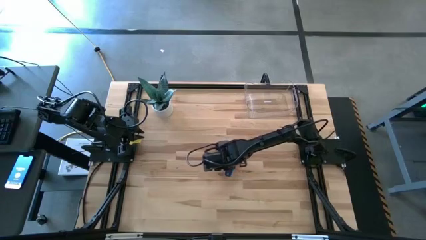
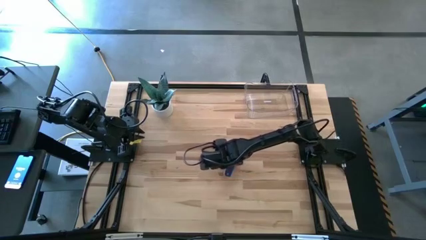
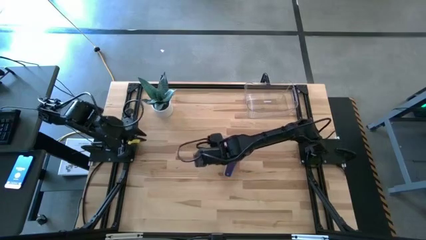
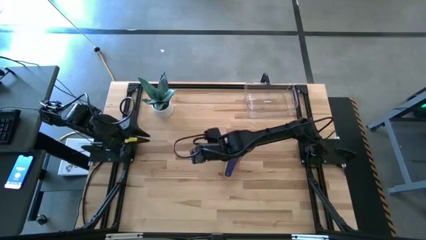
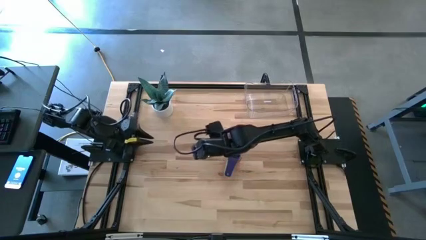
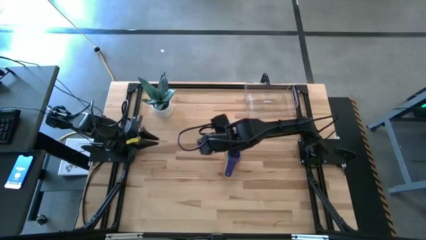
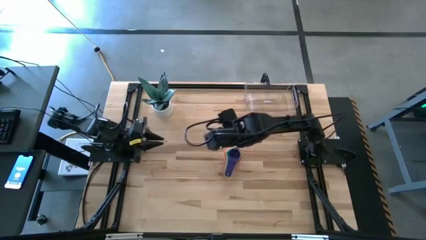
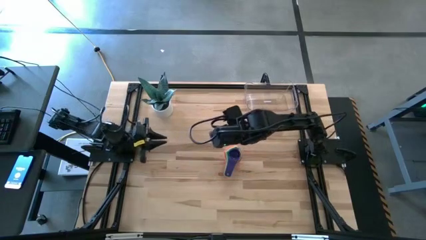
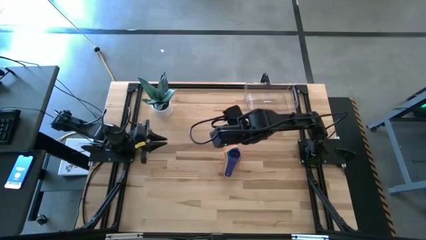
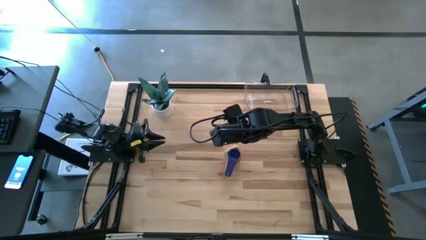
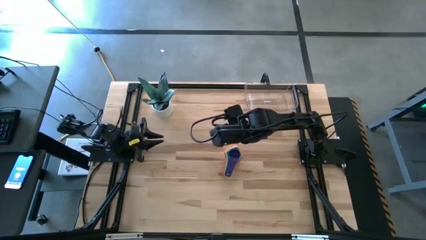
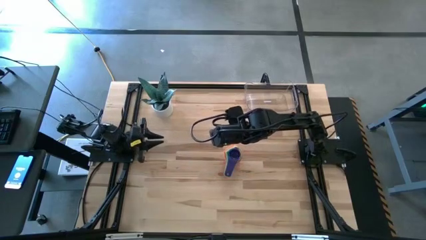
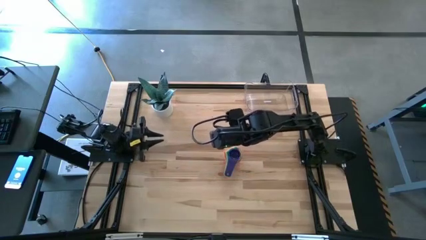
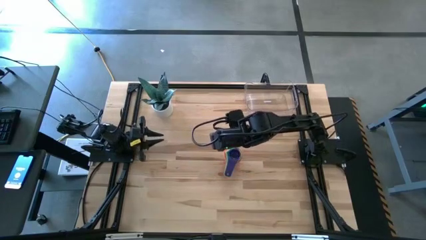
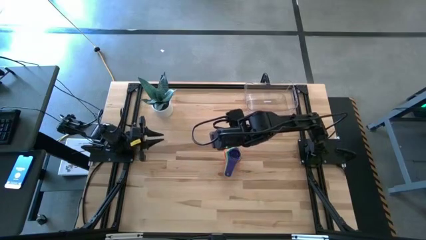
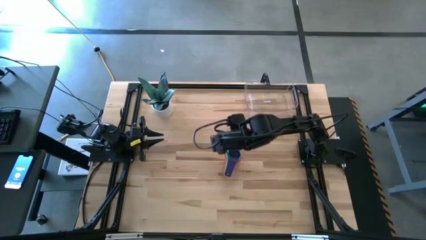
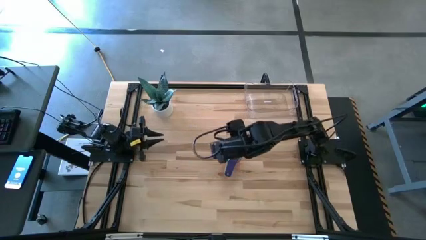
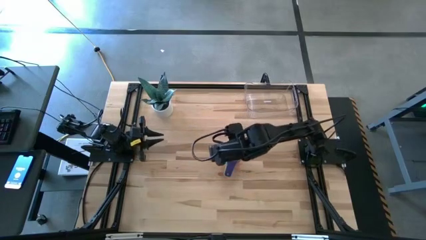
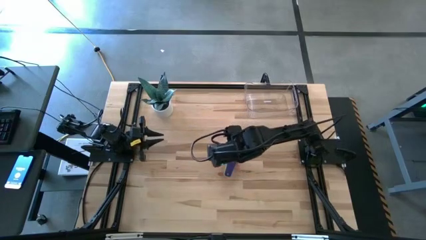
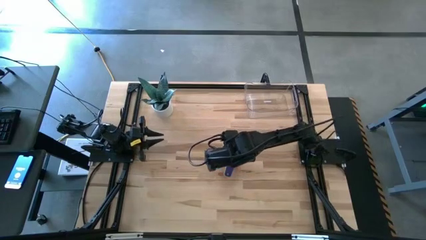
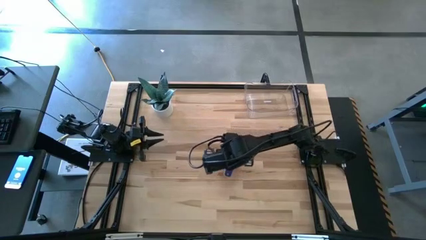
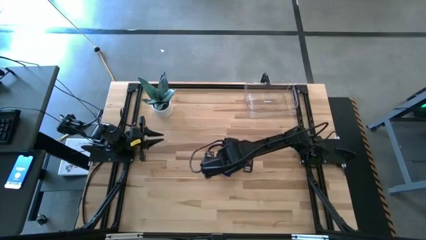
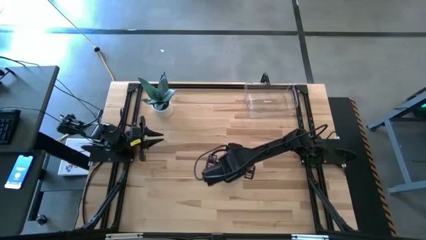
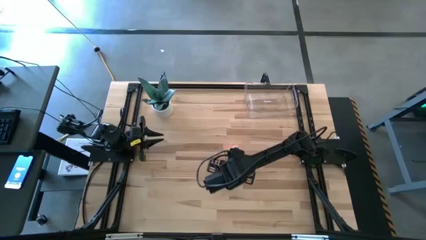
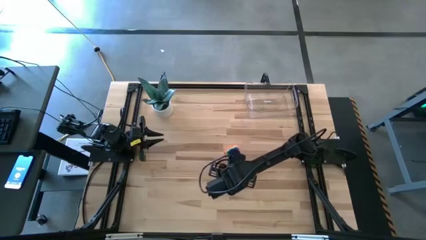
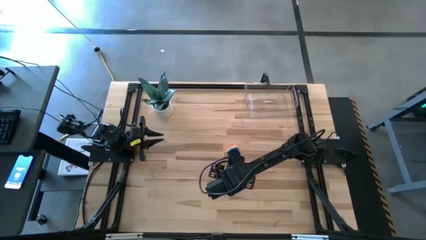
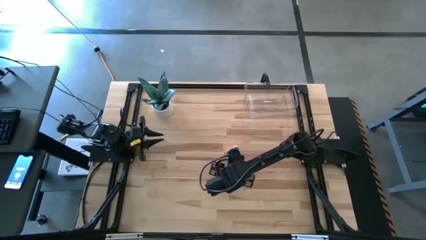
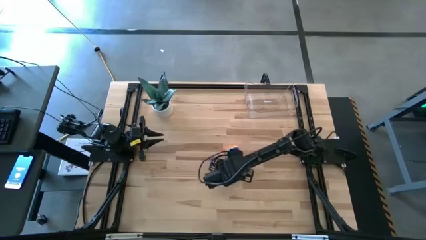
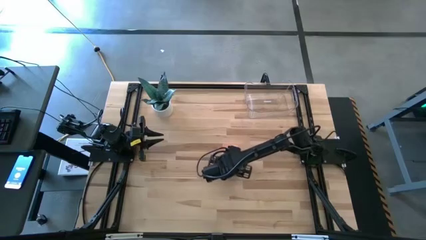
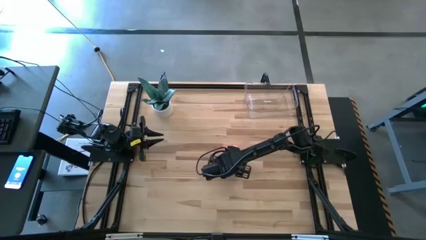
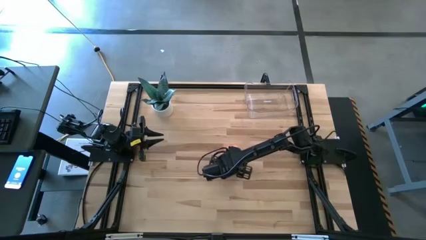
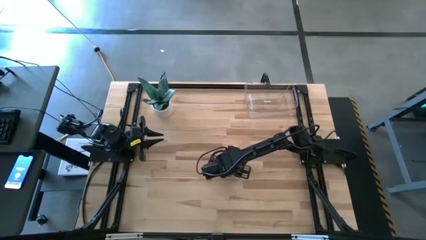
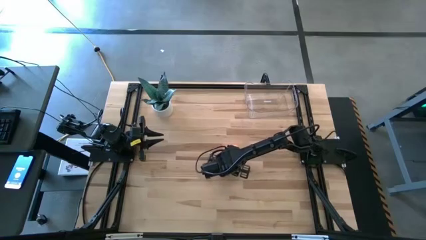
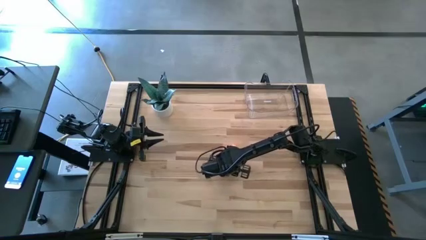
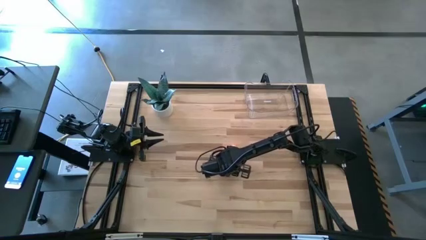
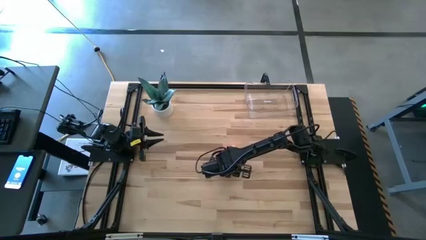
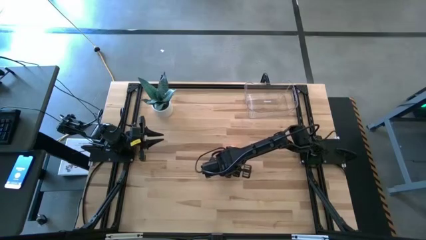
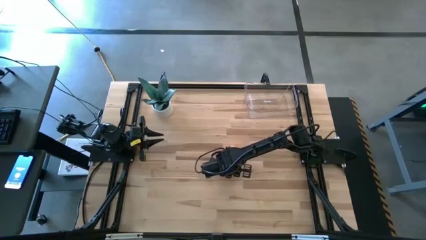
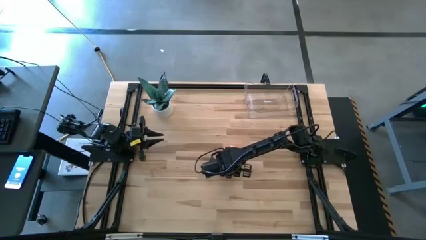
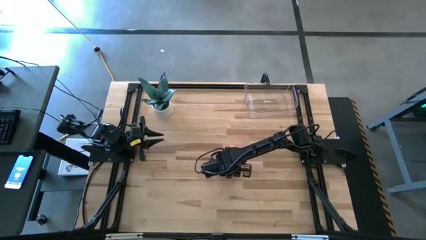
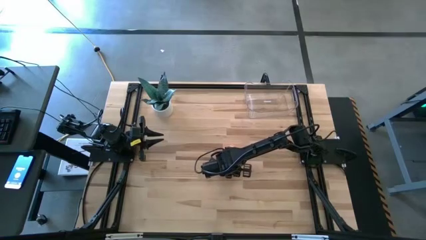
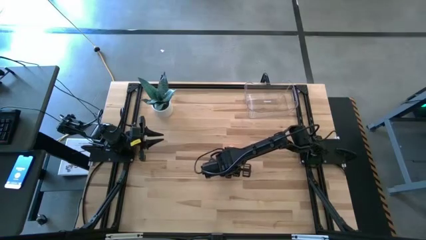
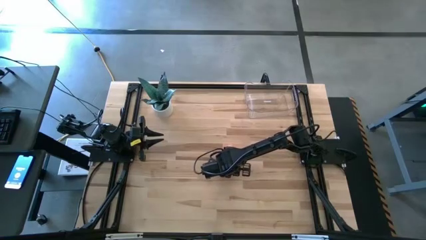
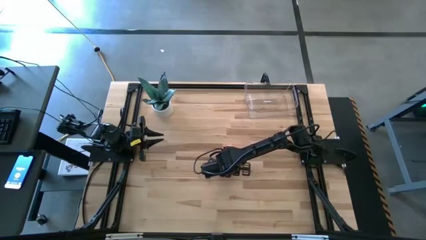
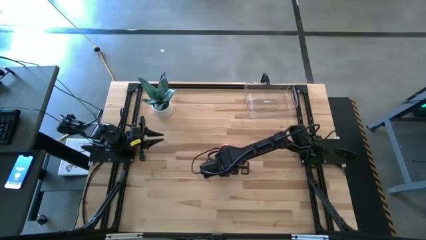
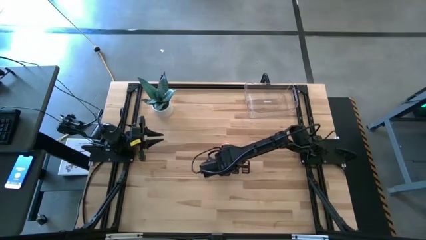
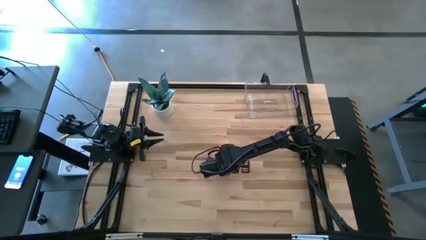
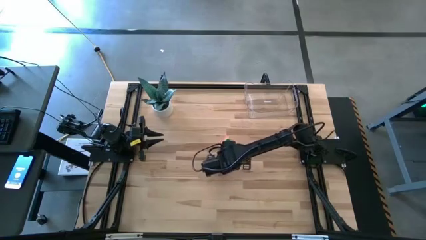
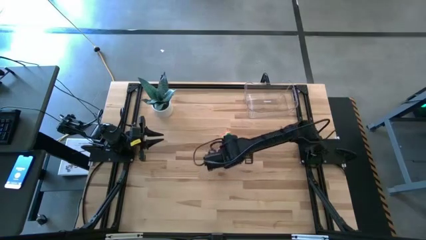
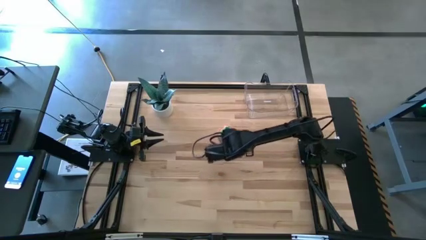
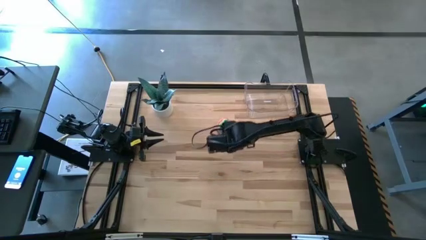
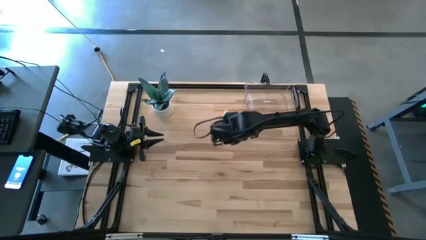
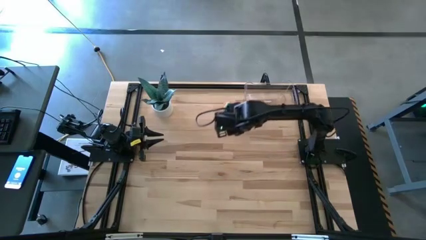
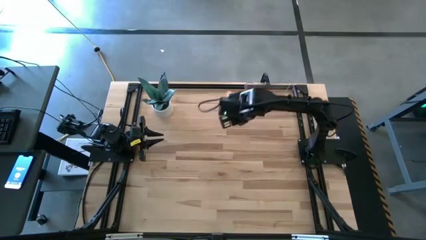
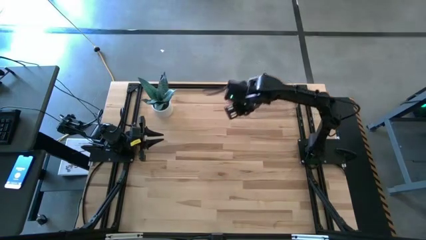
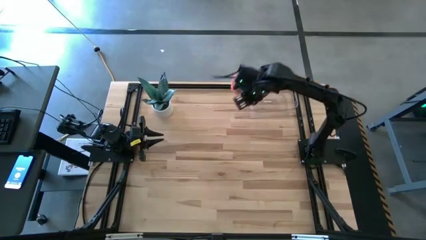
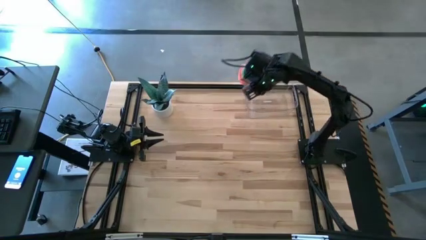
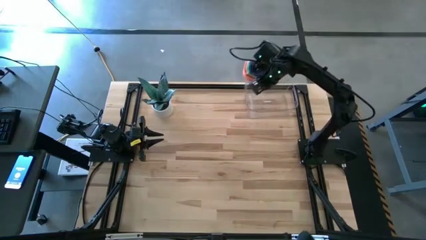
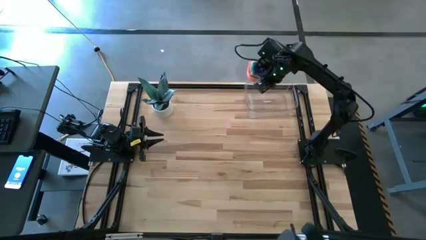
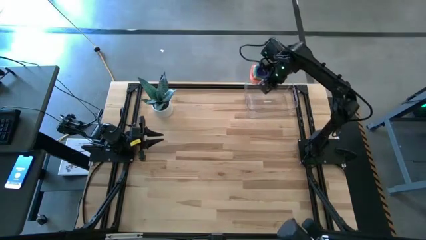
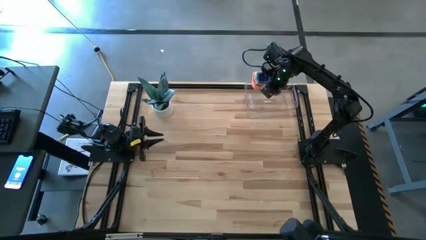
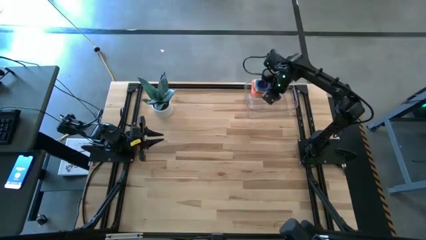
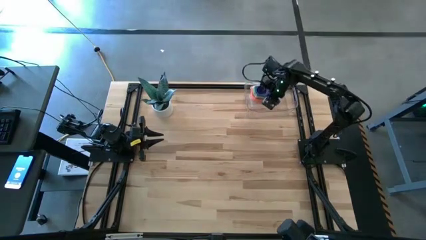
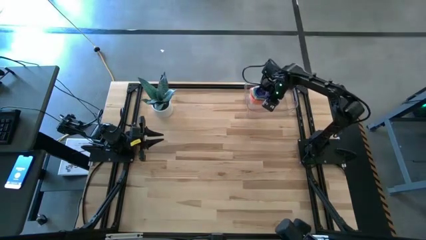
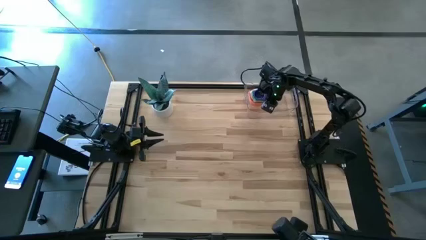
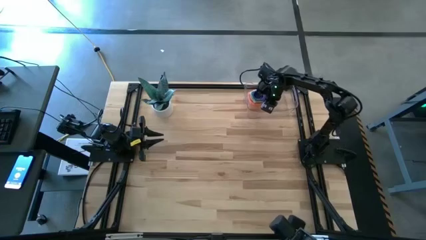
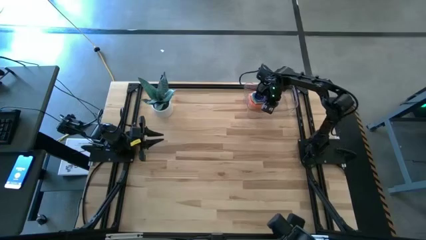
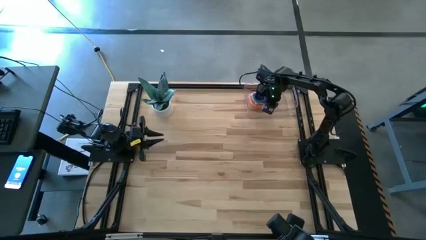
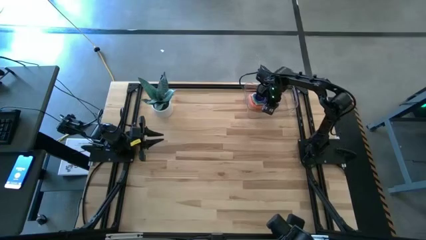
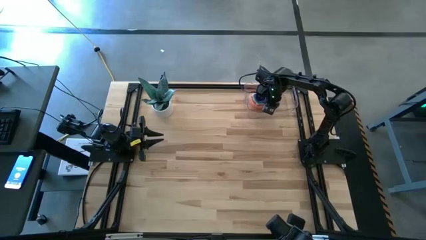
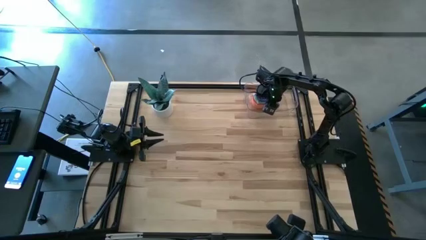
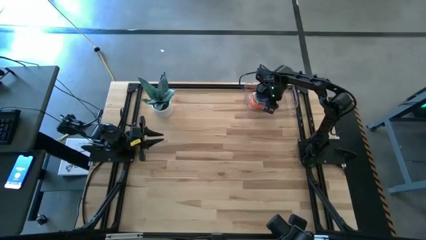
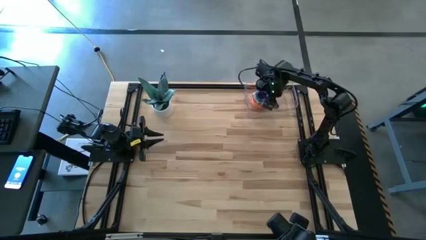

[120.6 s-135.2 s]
Task: Nest measuring cups in basket
Put the nested measuring cups into the transparent bin

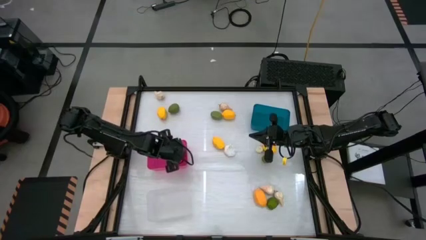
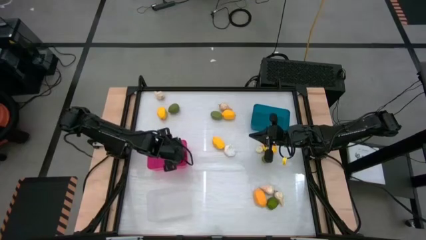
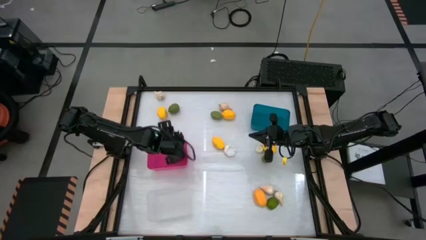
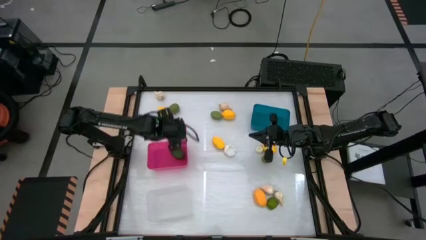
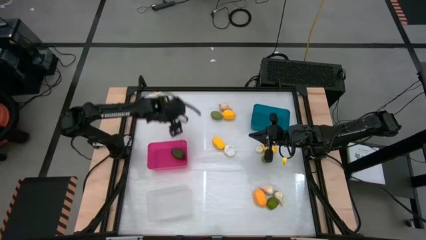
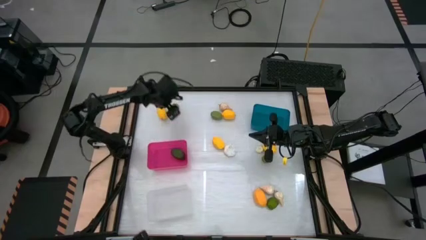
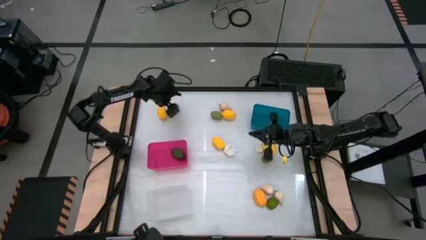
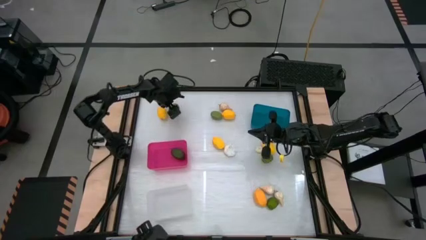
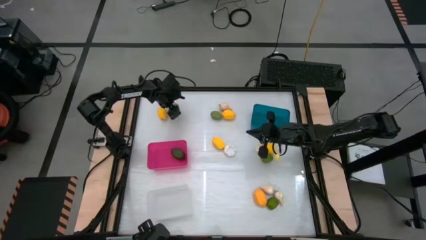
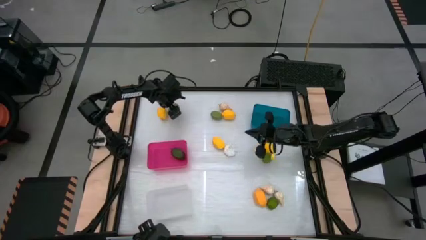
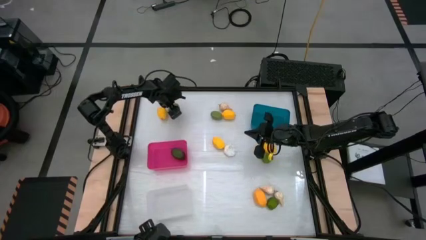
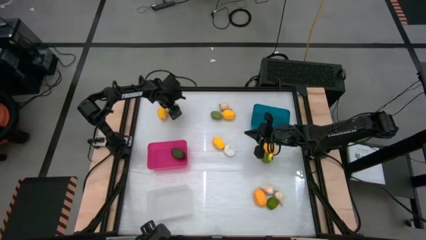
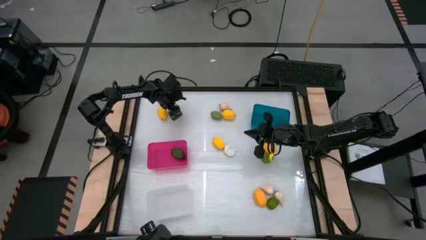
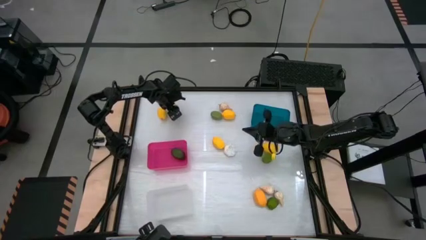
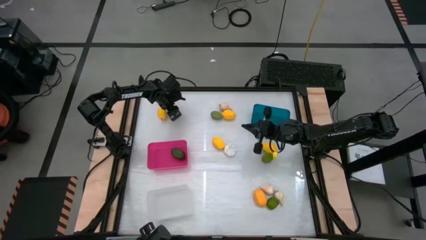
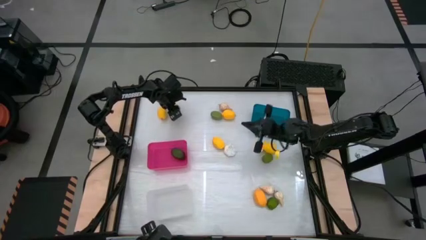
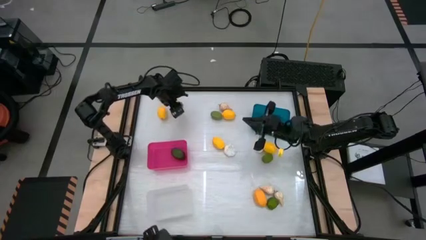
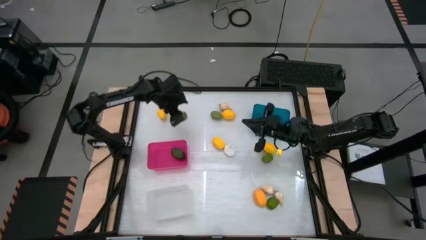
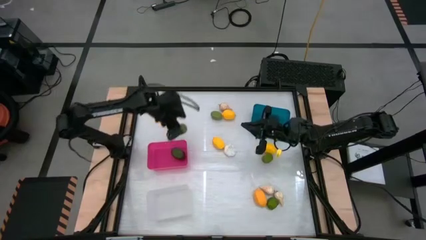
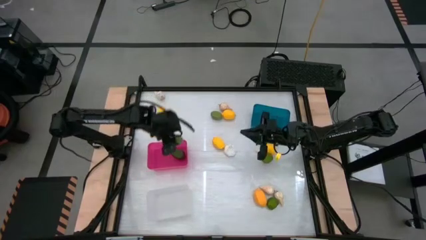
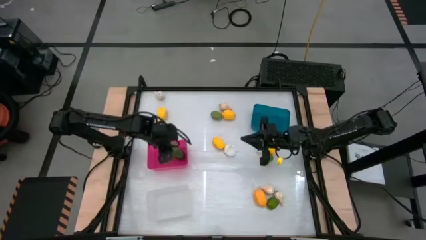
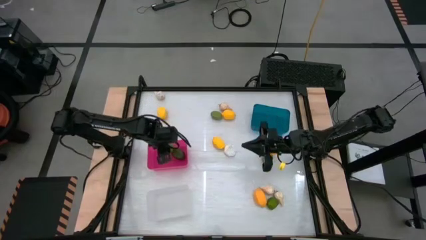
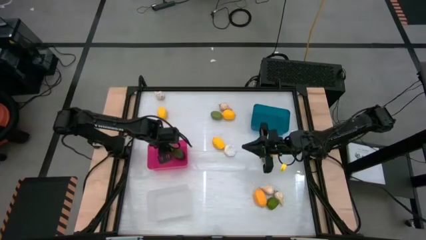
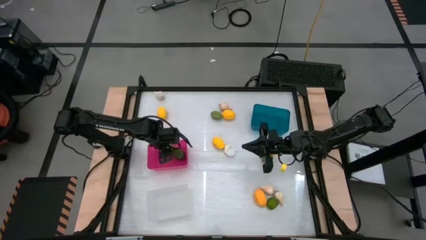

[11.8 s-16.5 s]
Task: Sort produce into baskets
Put the lime into the pink bin
